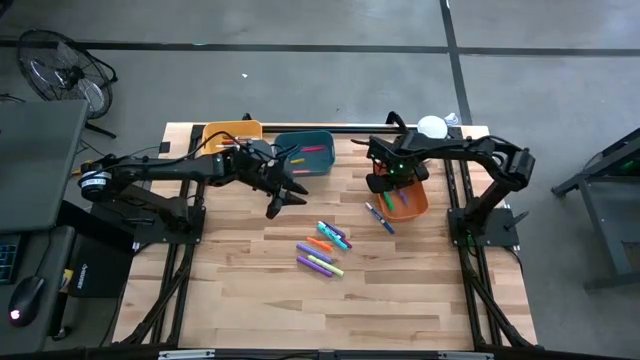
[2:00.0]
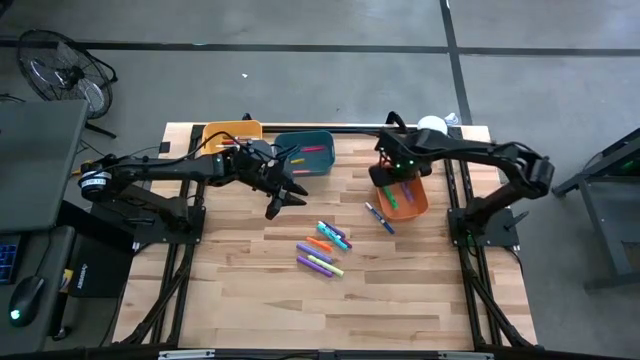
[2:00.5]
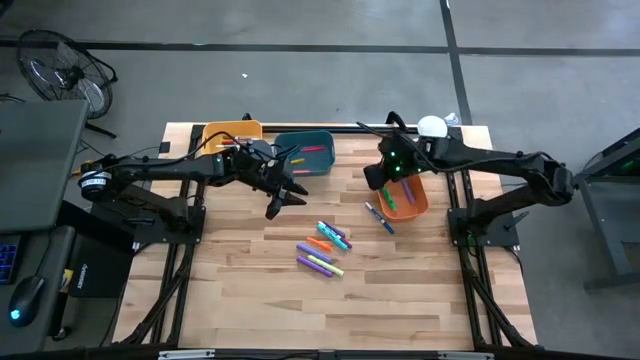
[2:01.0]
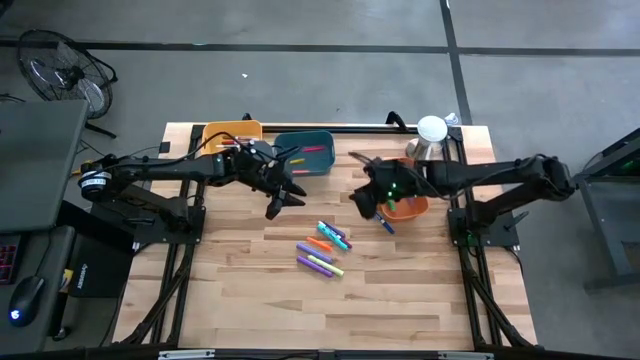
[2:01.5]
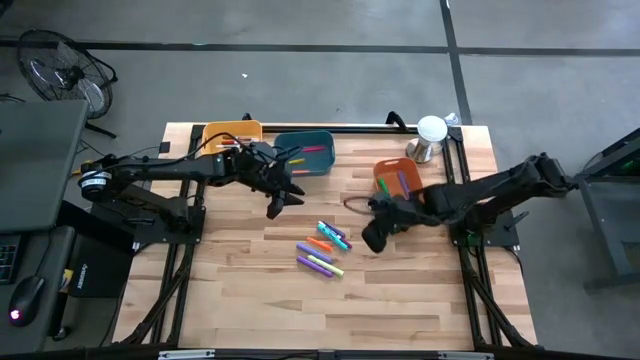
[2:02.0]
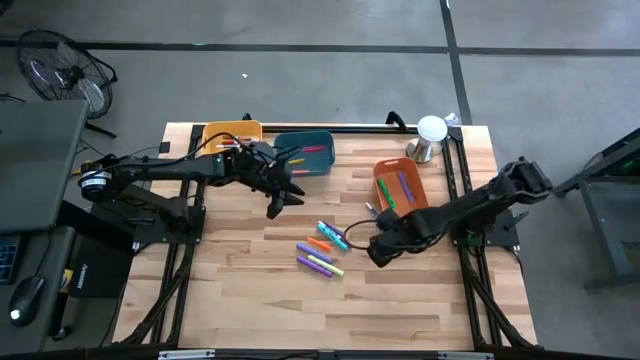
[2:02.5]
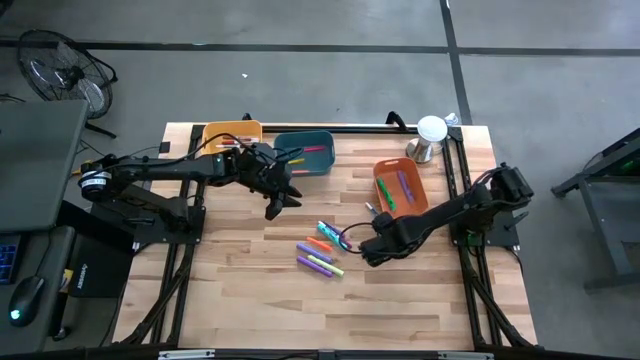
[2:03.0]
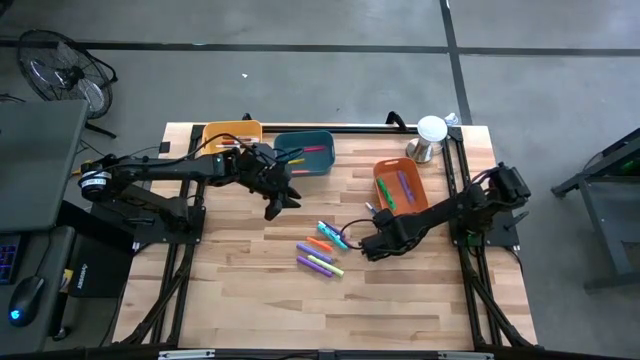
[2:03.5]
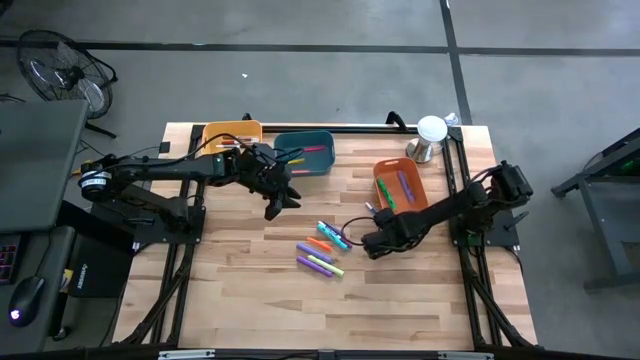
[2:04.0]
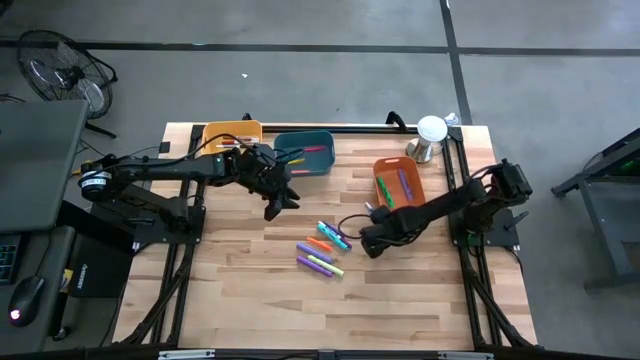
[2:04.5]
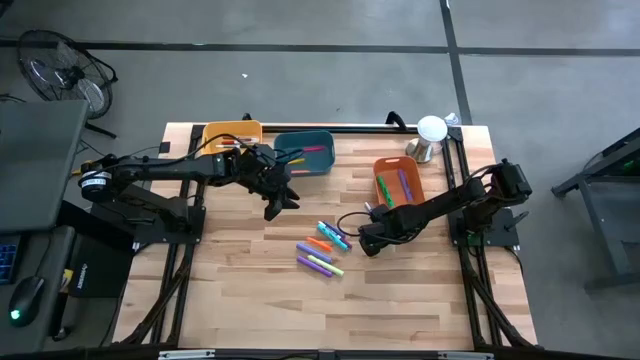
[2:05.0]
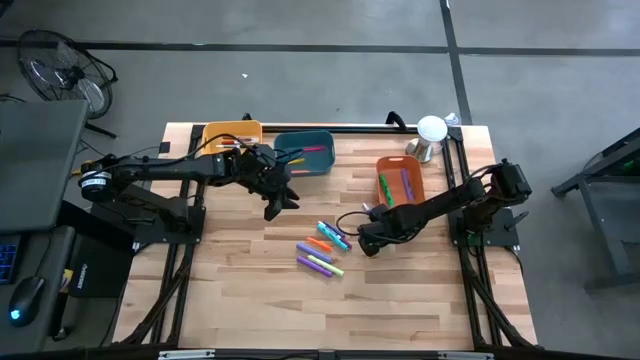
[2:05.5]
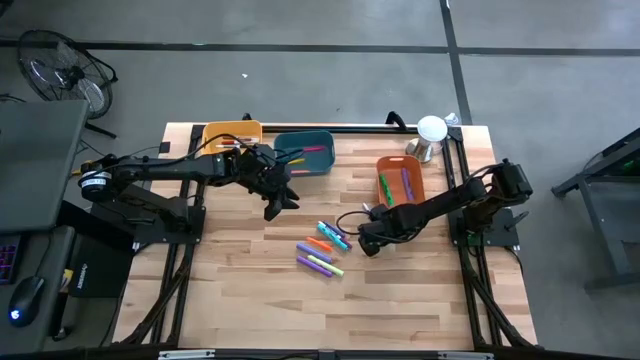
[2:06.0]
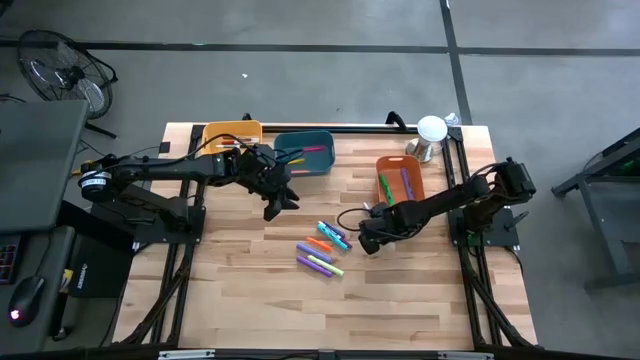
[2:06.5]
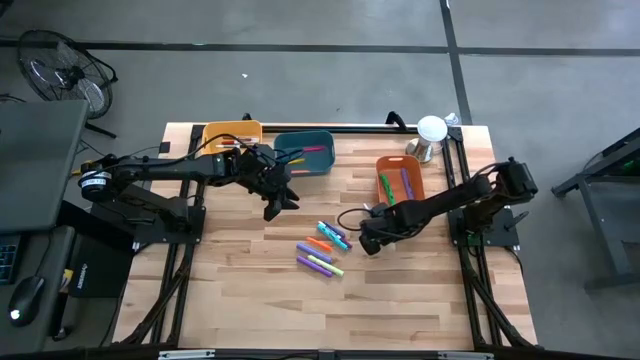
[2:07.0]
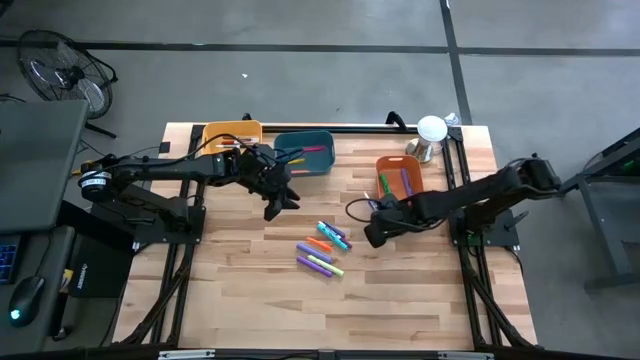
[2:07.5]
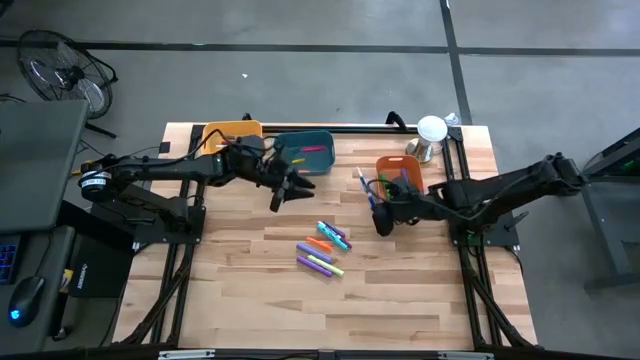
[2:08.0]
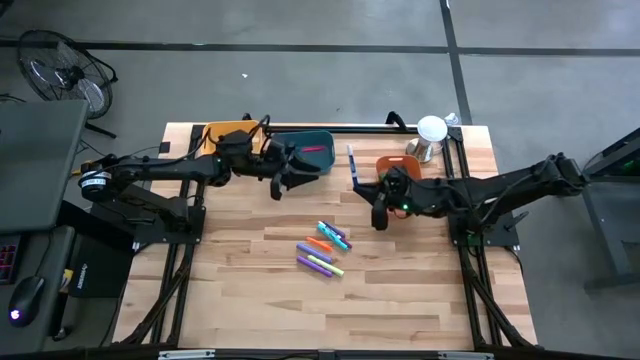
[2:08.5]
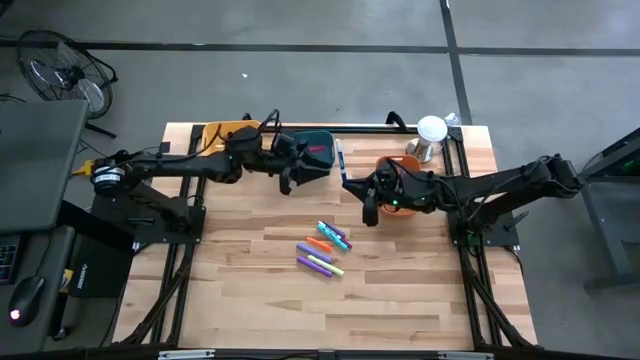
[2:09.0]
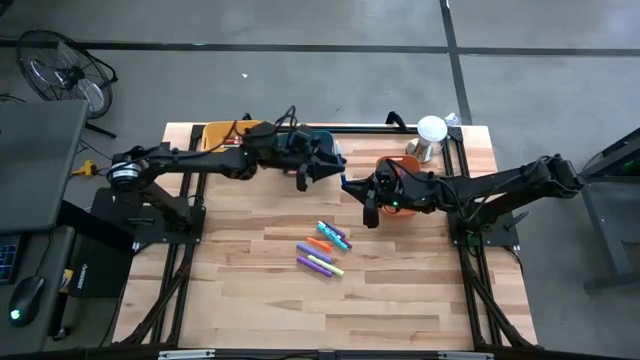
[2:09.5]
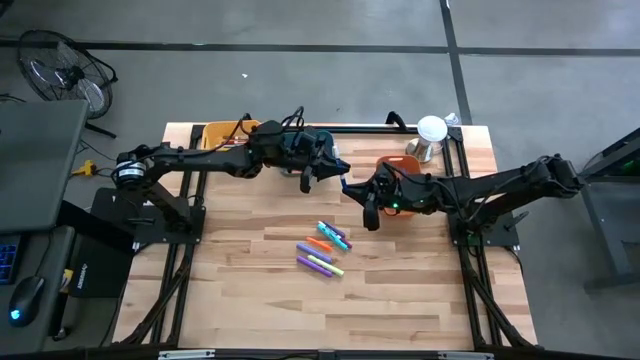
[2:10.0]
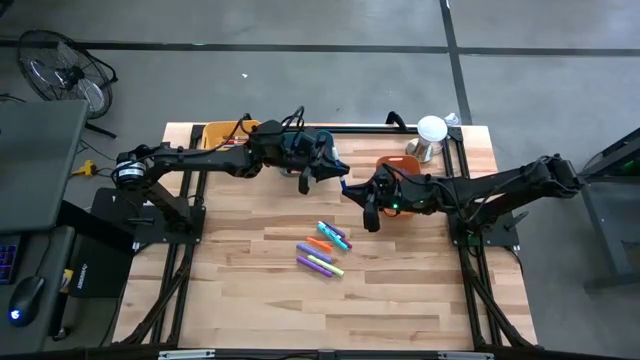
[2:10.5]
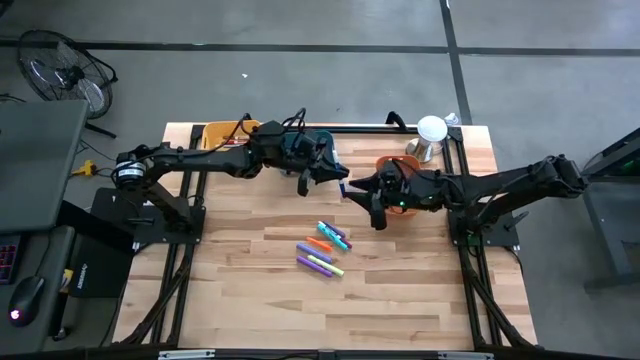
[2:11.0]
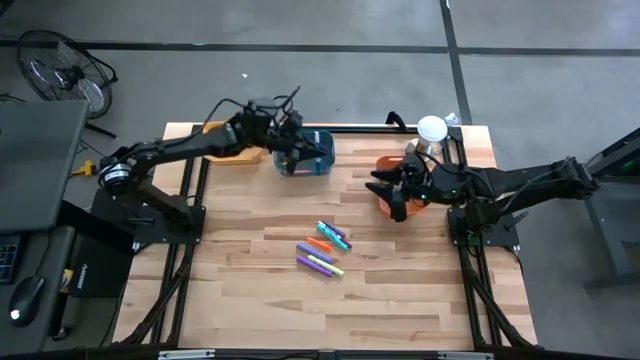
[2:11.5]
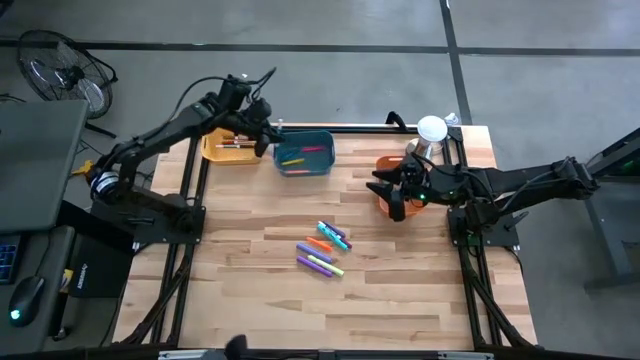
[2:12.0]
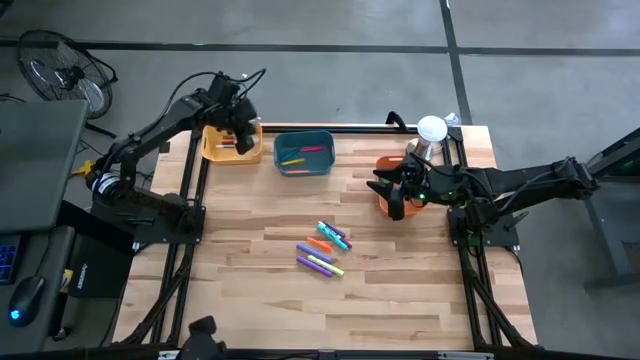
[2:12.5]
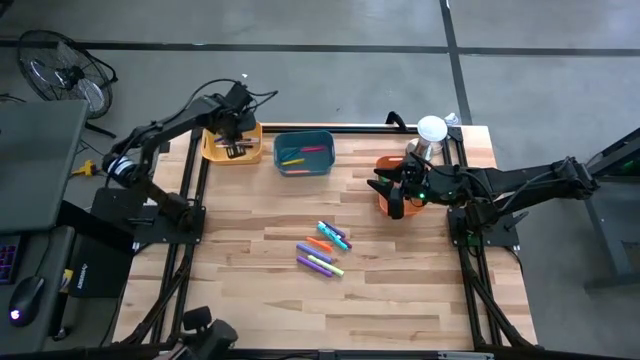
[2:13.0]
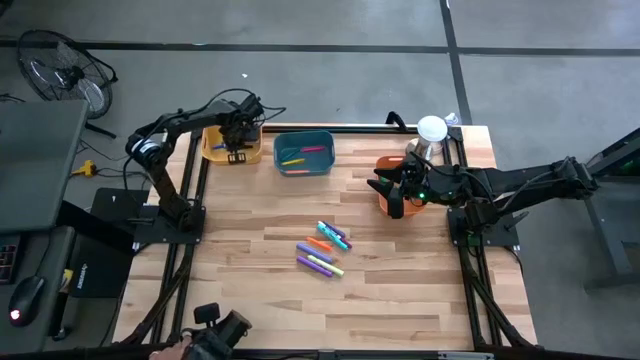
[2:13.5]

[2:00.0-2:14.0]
Task: Pick & Place Markers
Put the blue marker pen into the yellow bin
